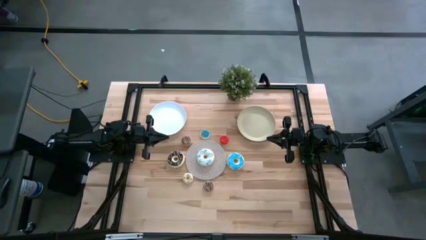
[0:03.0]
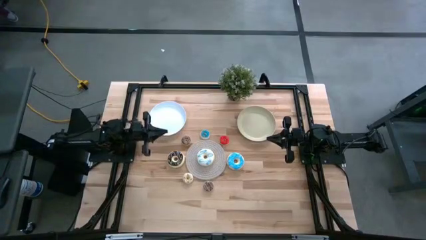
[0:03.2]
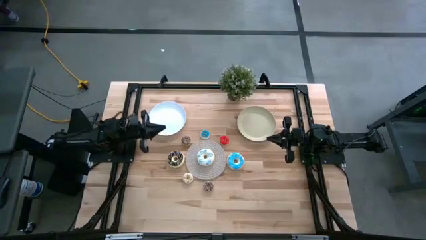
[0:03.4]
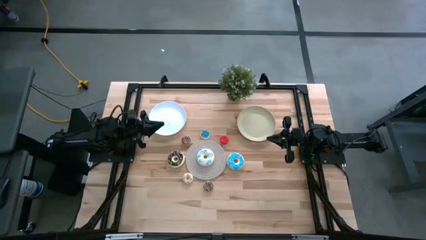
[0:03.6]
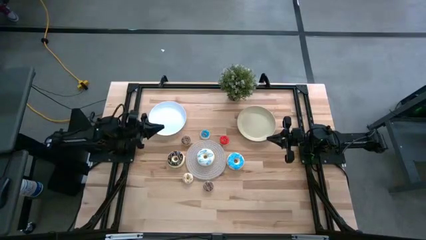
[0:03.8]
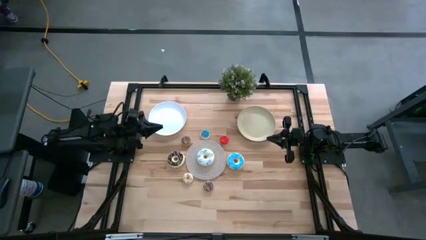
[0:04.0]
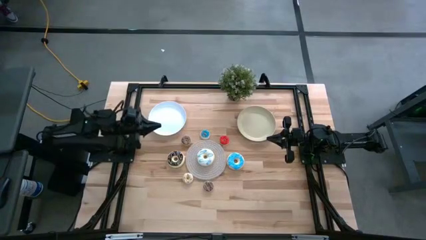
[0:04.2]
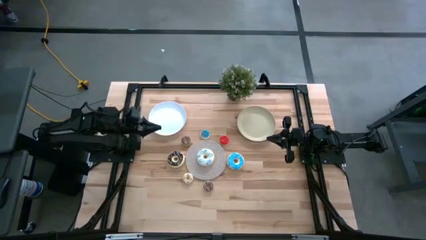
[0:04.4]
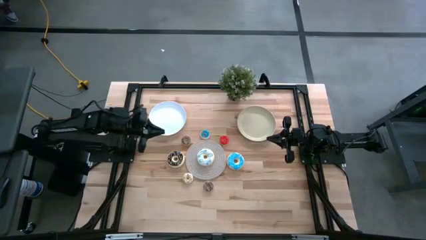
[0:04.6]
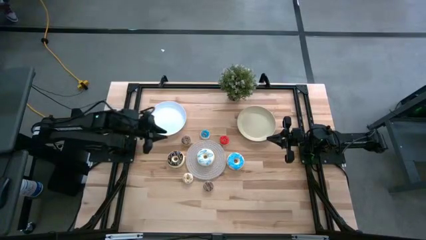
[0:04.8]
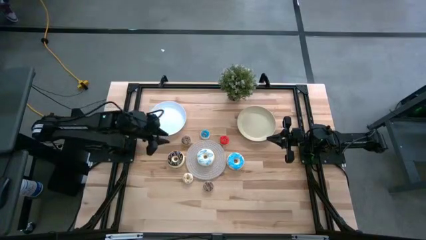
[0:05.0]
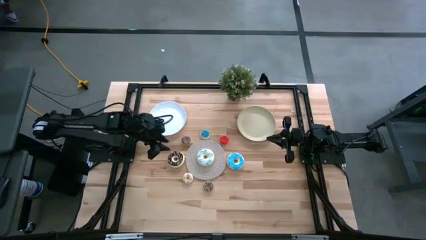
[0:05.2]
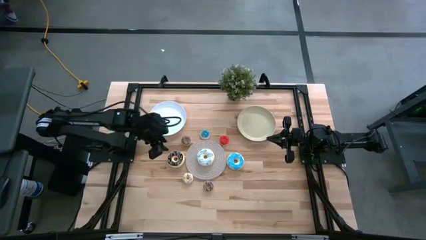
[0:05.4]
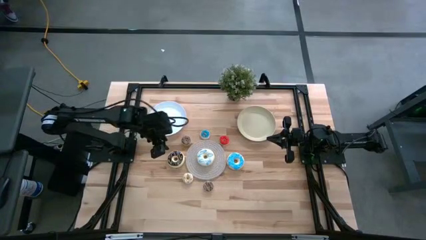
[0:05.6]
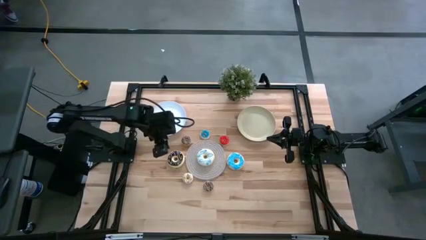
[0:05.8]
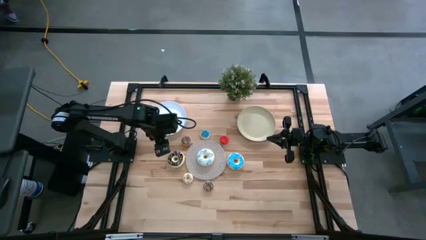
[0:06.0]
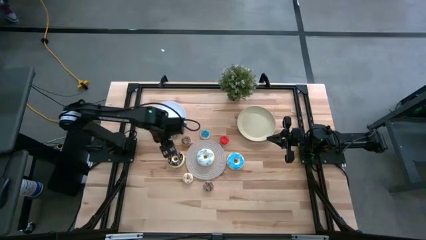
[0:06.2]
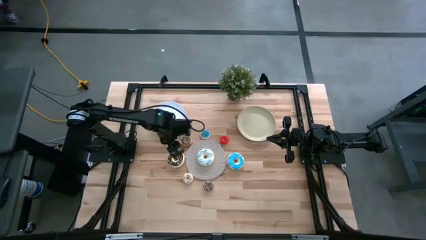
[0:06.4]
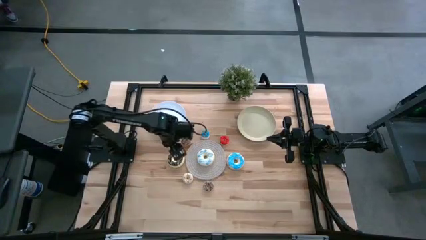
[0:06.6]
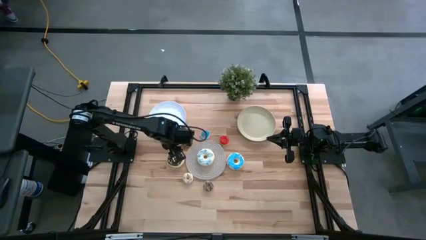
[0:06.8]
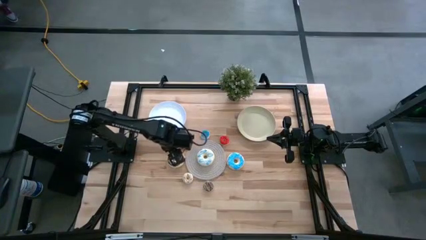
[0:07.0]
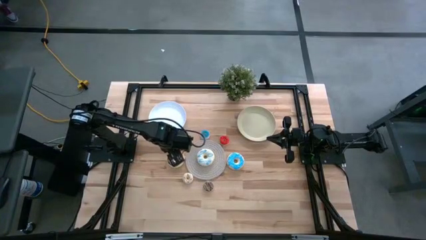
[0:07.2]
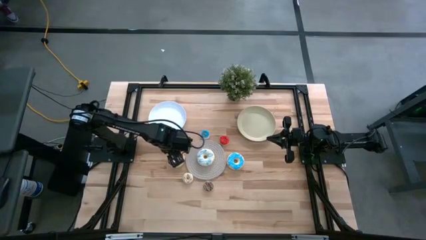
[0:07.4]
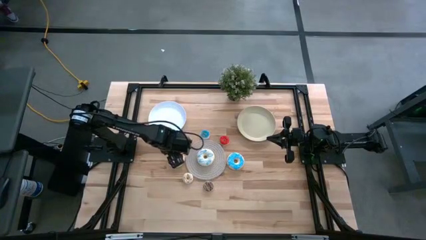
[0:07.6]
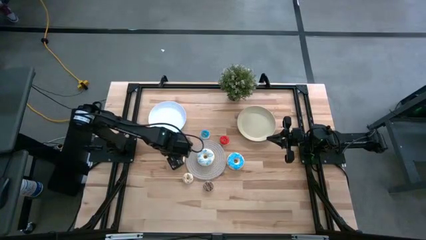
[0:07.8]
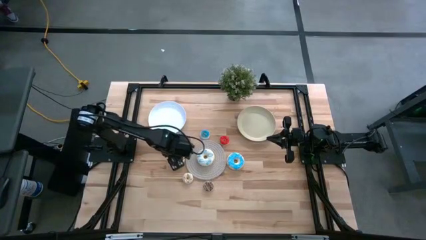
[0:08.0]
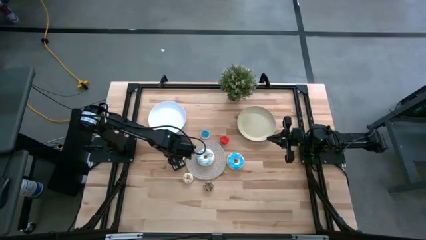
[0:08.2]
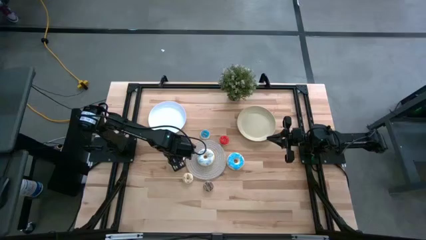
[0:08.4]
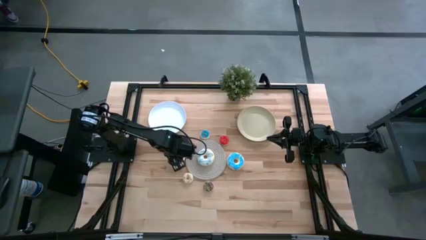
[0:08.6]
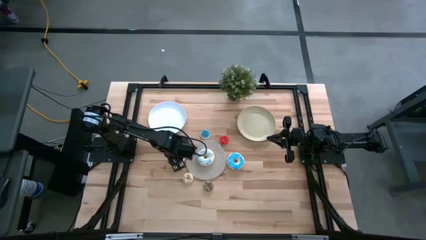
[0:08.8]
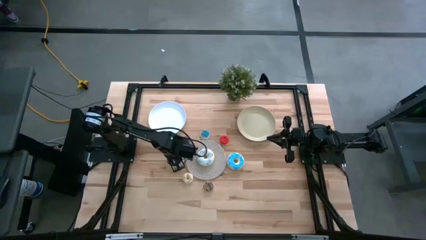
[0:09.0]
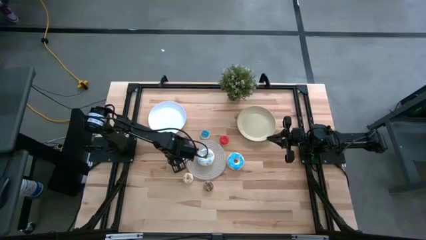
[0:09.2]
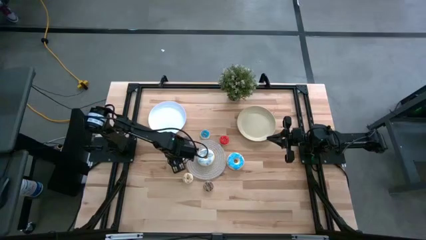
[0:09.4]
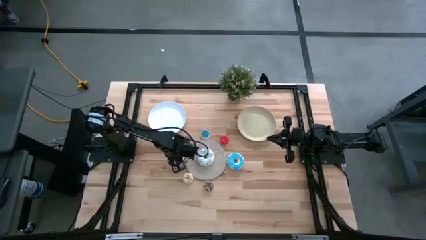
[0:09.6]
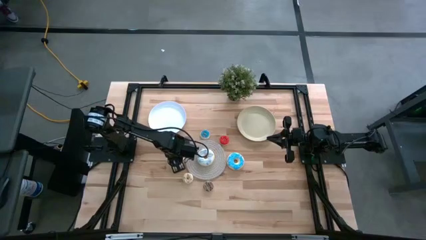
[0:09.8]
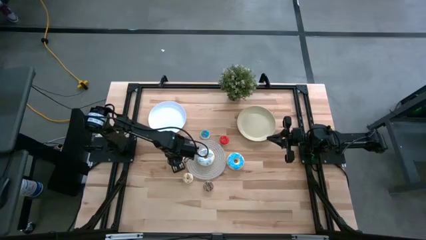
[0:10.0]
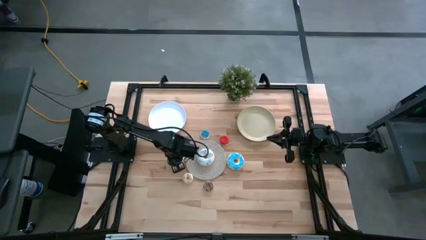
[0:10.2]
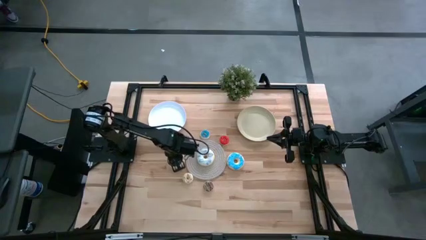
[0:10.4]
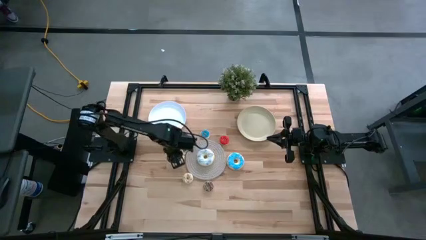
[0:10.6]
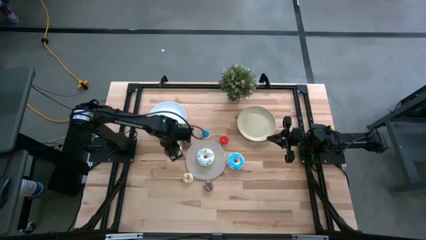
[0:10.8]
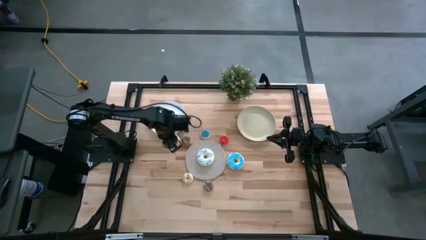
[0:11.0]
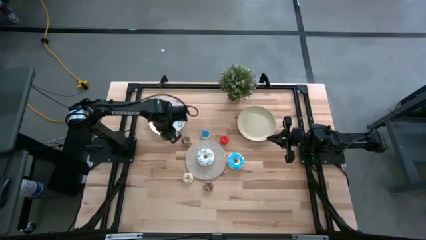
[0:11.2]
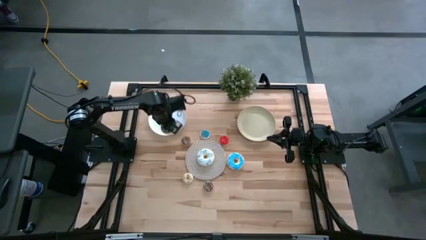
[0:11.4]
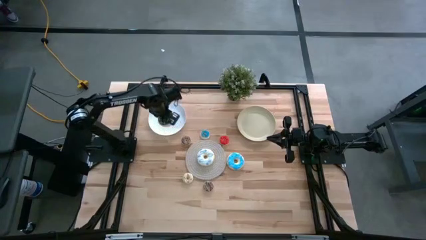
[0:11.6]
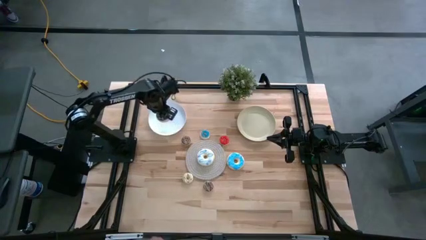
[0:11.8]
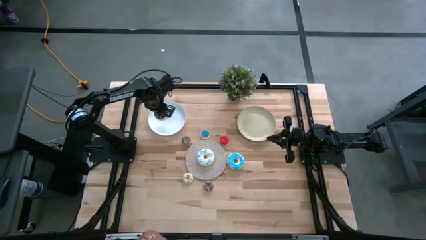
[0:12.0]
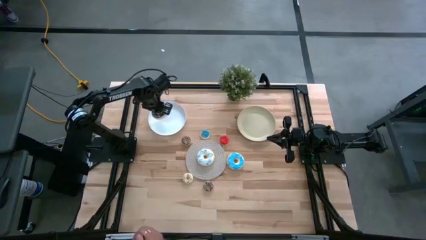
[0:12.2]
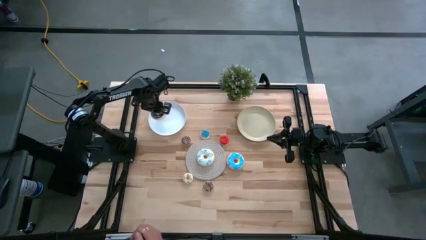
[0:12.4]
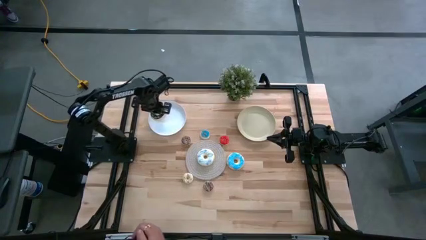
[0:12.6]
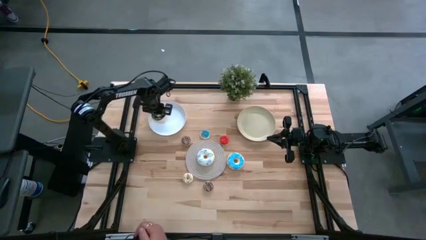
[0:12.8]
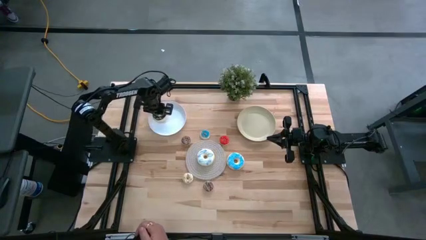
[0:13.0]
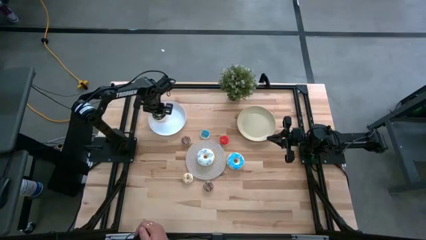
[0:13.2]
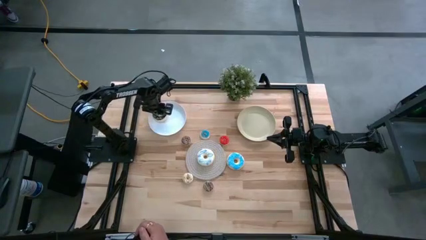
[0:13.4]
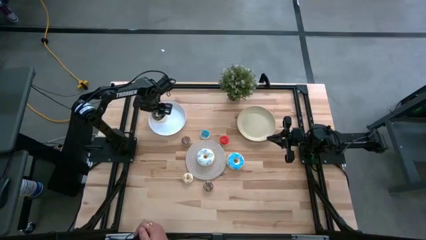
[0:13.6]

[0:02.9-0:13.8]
Task: Pick & Place donuts
Put the large black donut on the white plate
